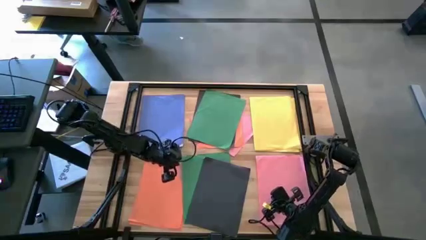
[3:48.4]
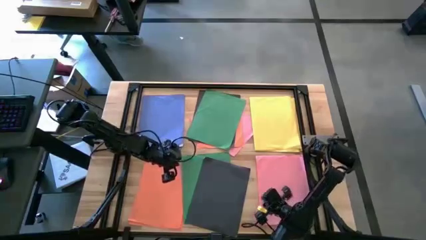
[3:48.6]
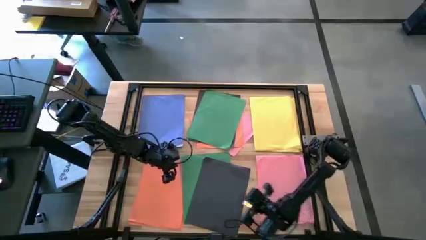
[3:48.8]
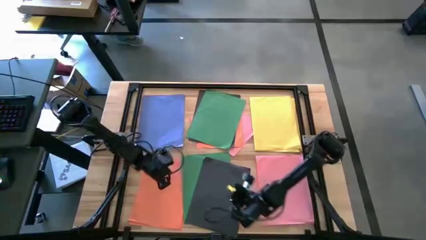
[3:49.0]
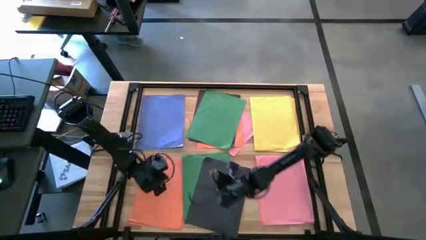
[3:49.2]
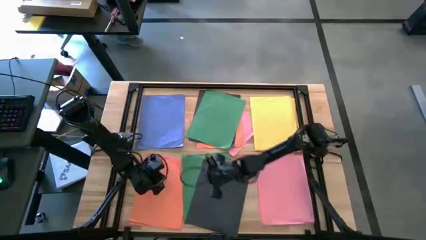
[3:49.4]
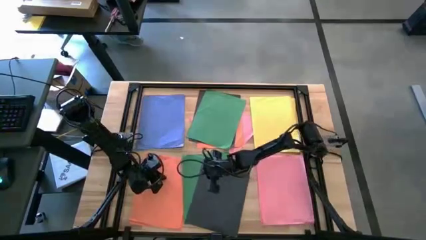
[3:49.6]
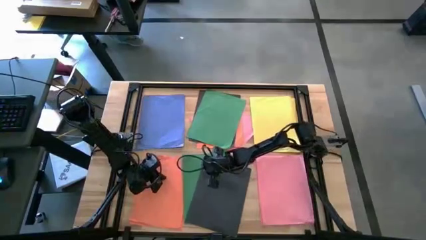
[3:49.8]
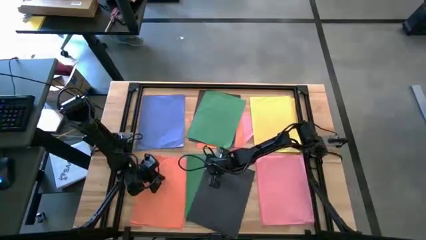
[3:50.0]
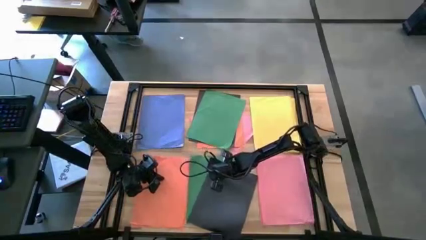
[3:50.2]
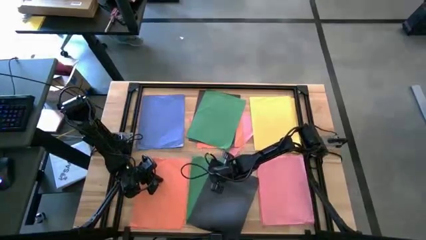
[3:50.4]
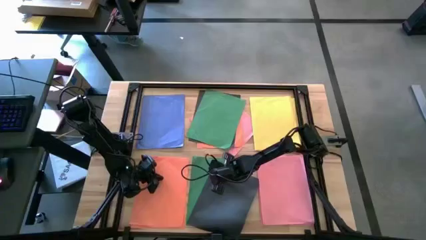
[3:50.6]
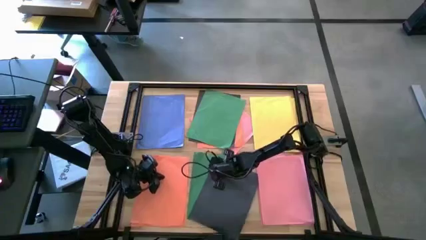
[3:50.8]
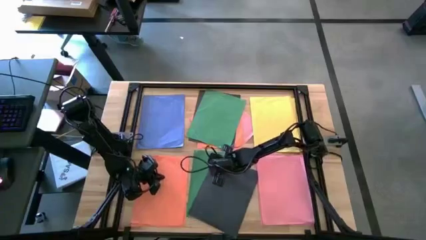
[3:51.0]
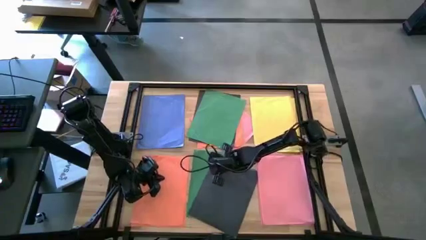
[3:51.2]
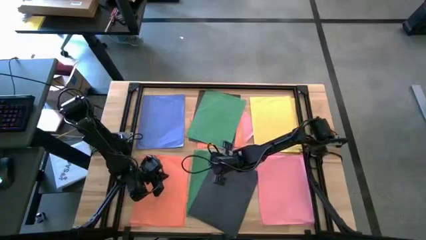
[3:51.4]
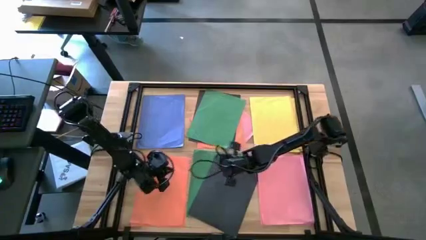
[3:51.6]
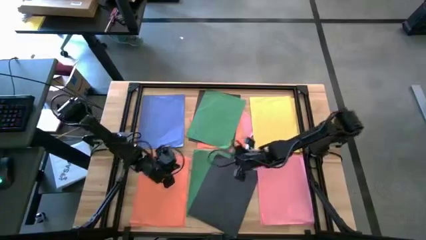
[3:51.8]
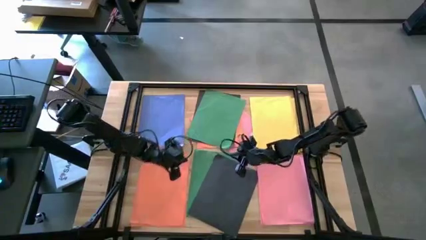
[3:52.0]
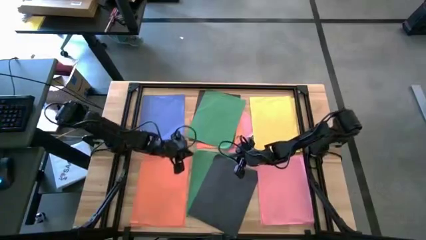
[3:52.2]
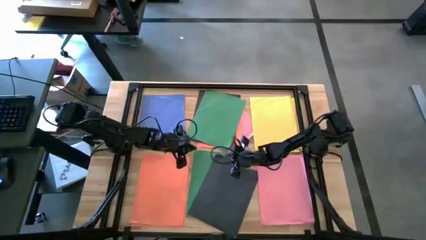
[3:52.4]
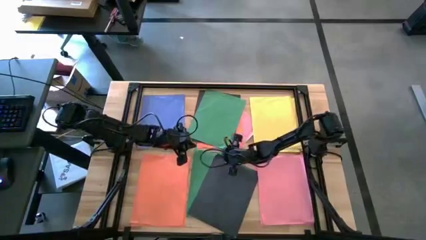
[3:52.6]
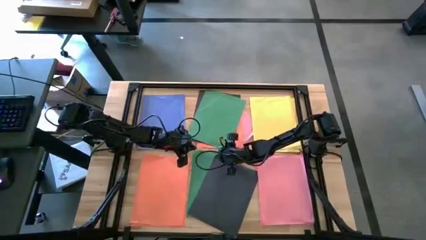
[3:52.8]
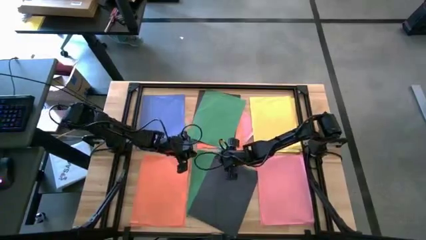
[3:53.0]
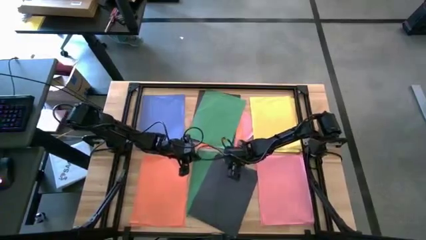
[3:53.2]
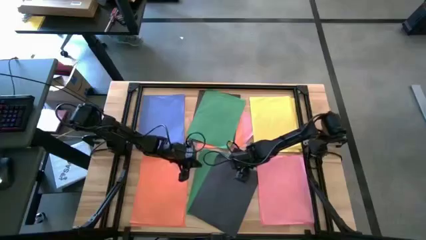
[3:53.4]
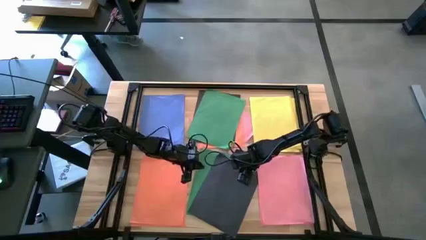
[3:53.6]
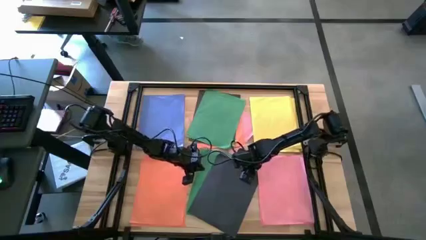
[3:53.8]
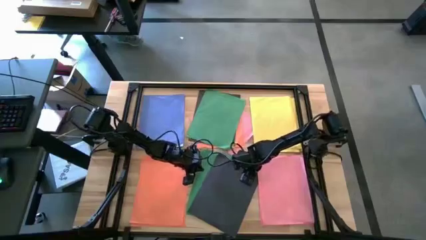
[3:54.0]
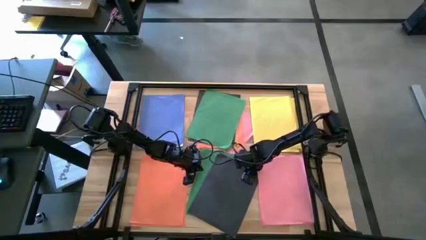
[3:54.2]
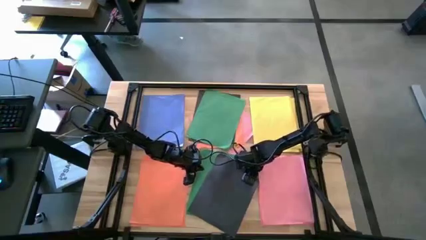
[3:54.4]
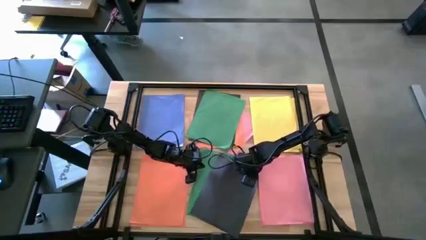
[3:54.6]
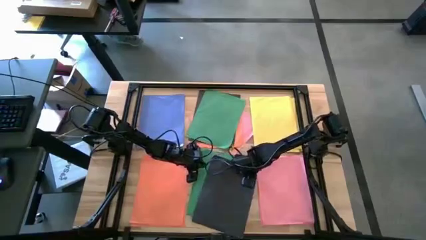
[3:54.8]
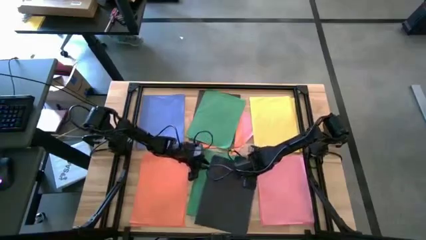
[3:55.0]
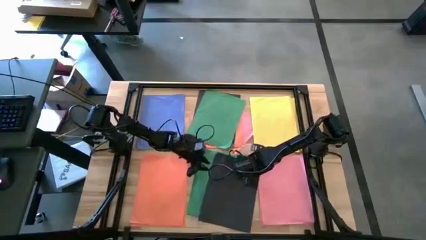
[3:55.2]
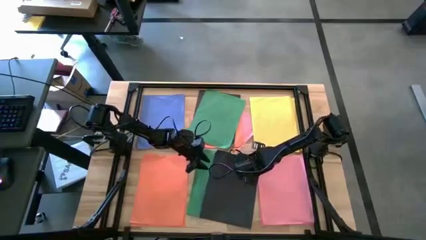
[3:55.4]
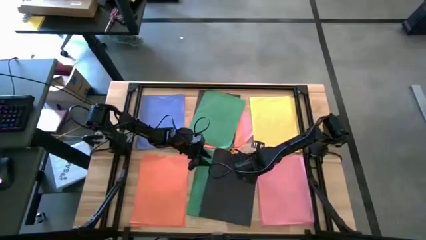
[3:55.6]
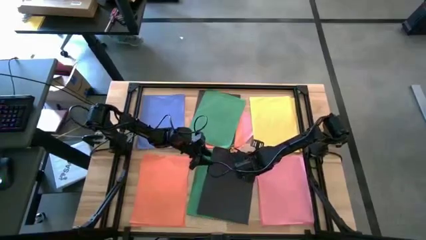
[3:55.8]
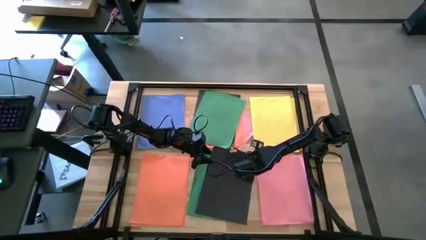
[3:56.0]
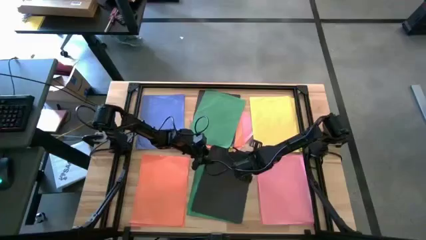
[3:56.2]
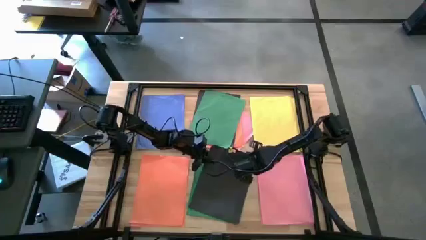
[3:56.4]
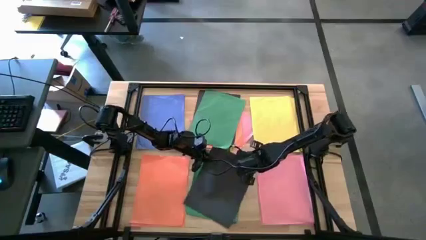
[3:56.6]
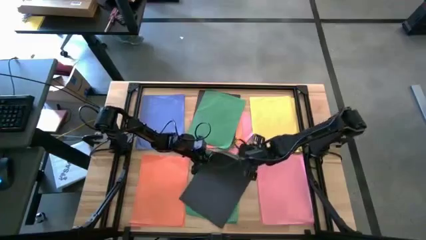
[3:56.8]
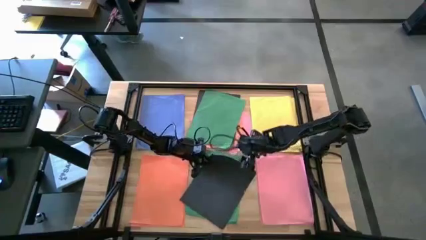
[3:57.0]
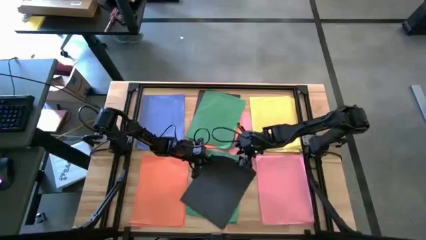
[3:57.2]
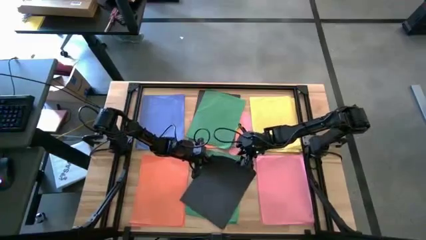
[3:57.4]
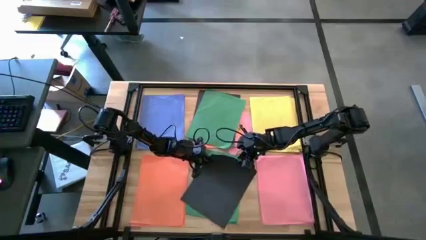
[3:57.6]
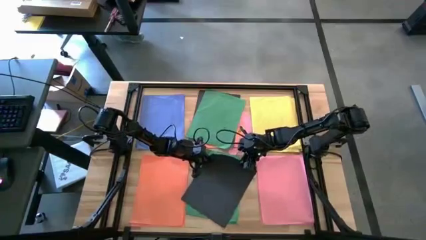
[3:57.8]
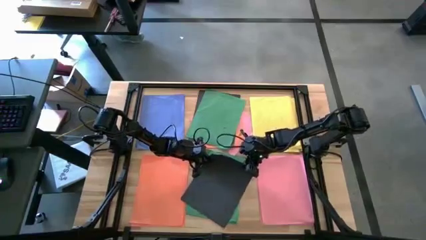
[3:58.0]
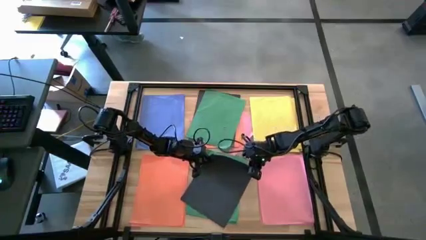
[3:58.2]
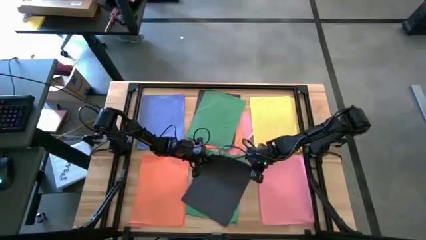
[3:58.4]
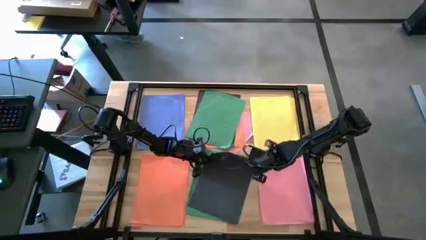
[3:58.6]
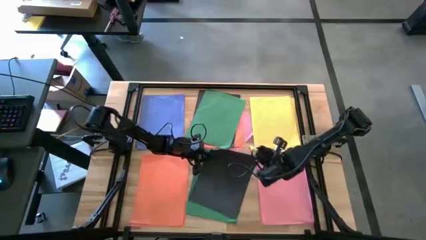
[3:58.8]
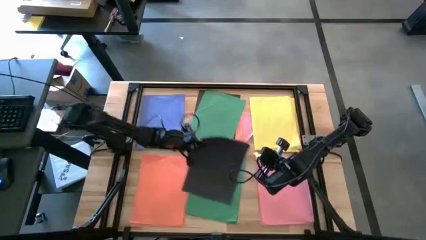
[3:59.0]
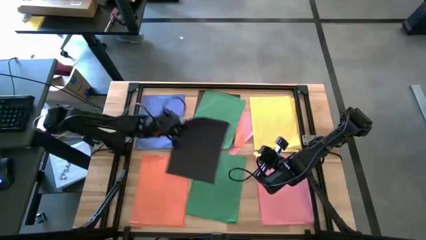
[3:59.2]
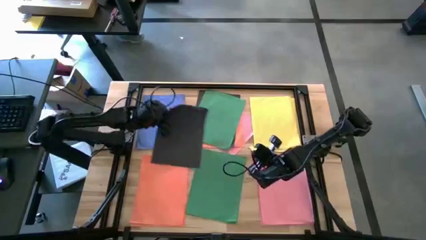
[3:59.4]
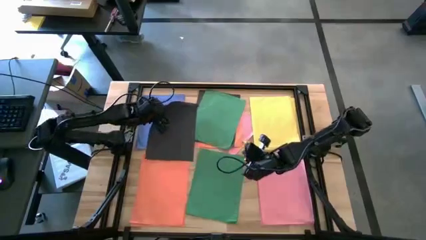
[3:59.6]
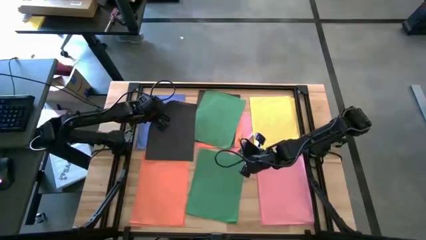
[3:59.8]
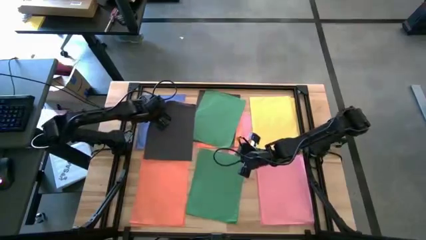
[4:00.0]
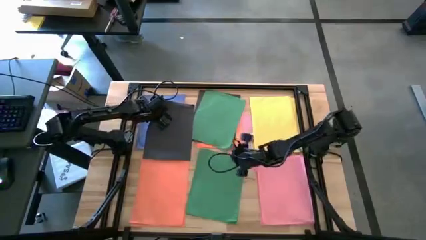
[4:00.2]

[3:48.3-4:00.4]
Task: Organize paper
Move the black paper on the blue paper
